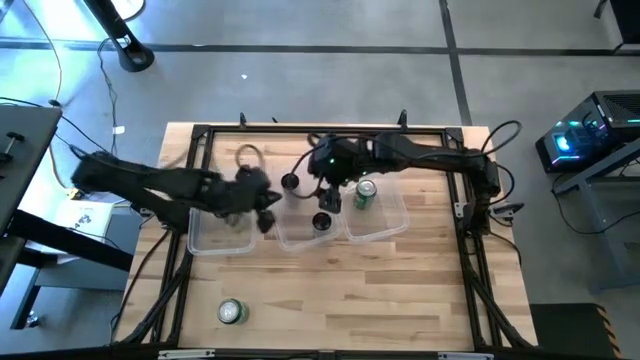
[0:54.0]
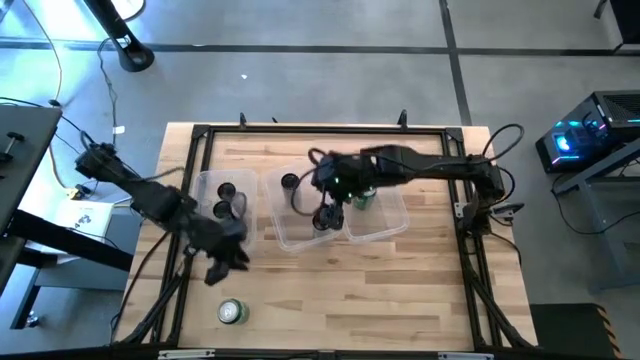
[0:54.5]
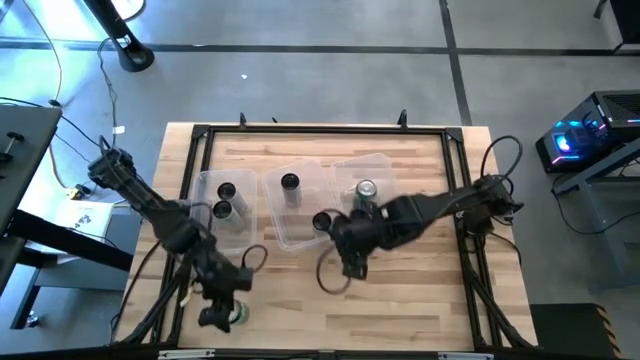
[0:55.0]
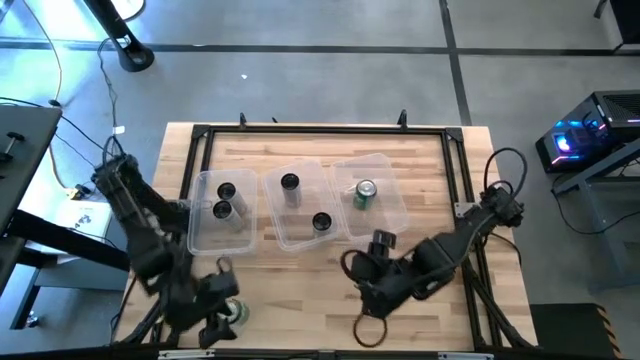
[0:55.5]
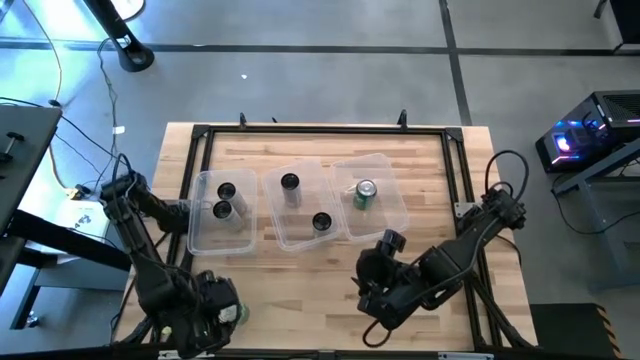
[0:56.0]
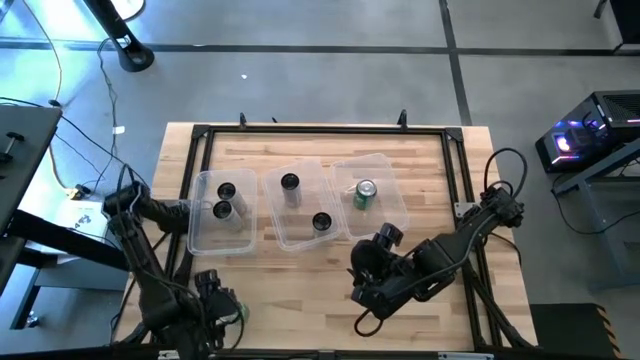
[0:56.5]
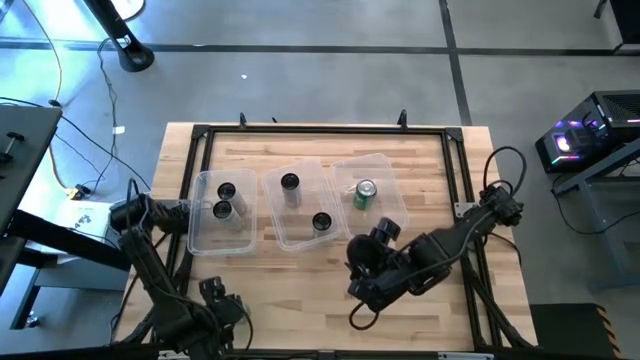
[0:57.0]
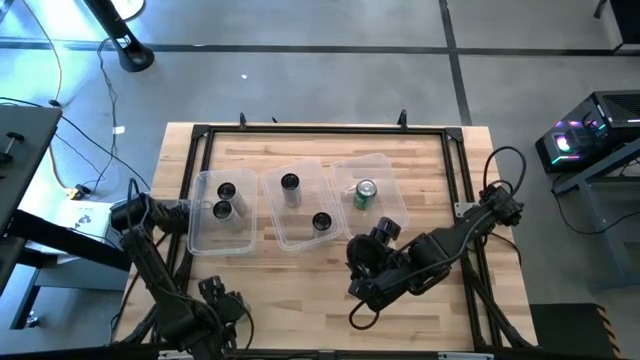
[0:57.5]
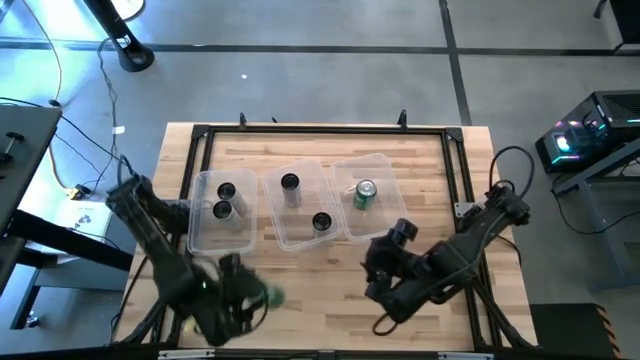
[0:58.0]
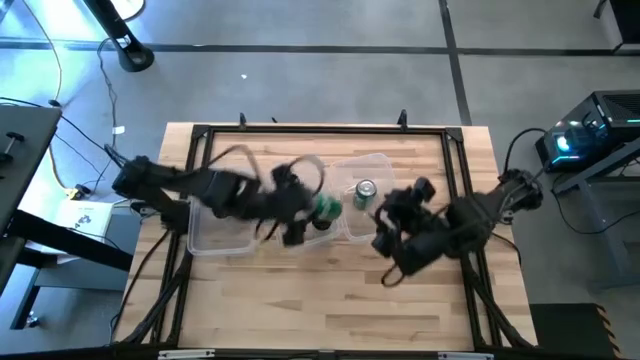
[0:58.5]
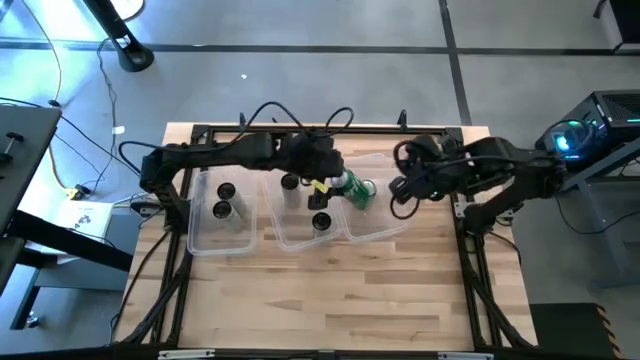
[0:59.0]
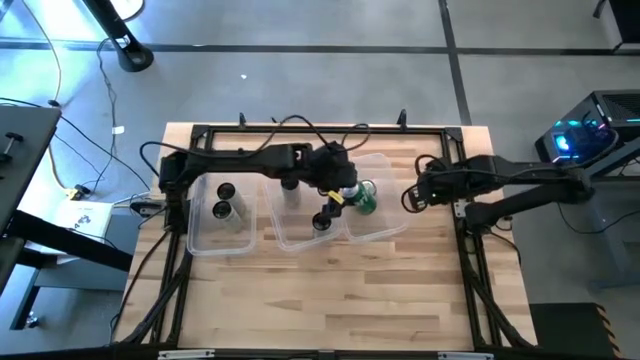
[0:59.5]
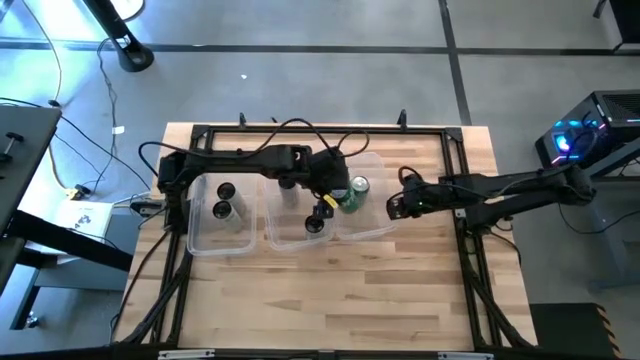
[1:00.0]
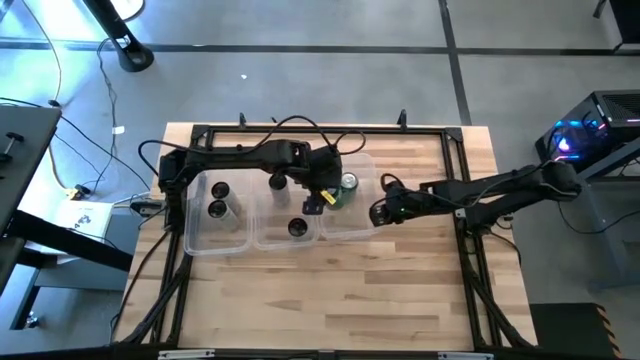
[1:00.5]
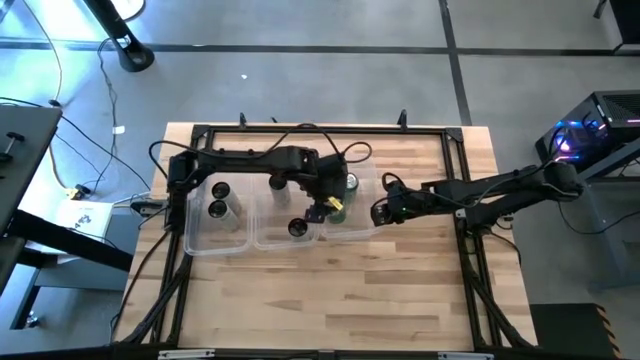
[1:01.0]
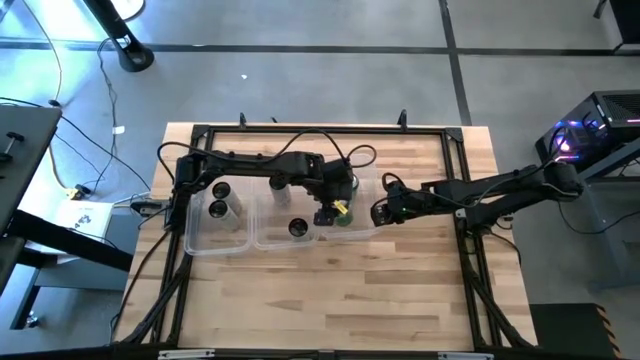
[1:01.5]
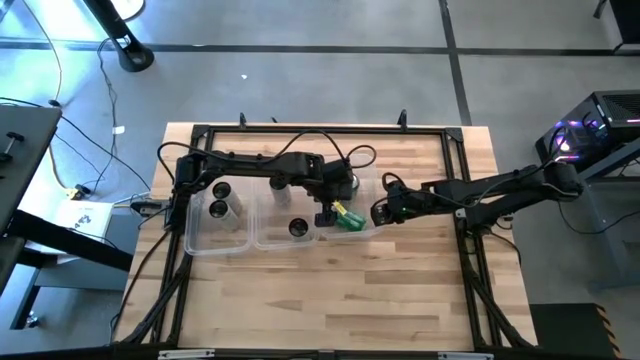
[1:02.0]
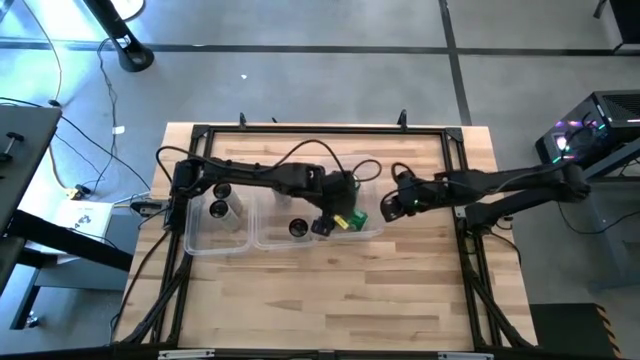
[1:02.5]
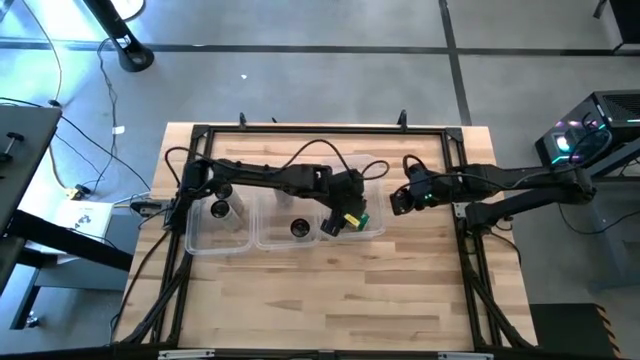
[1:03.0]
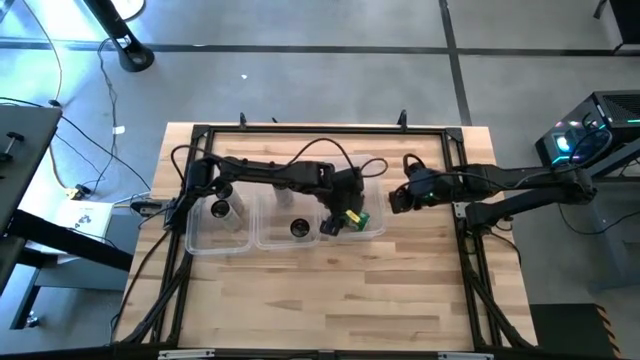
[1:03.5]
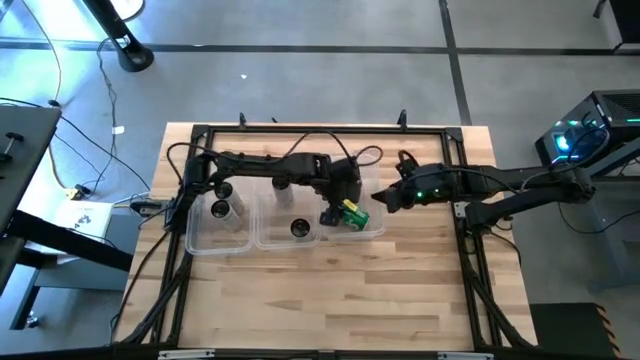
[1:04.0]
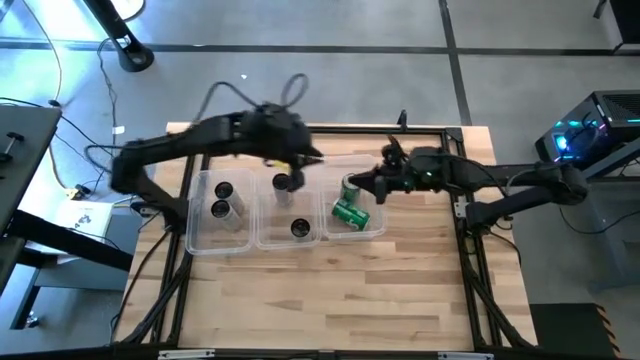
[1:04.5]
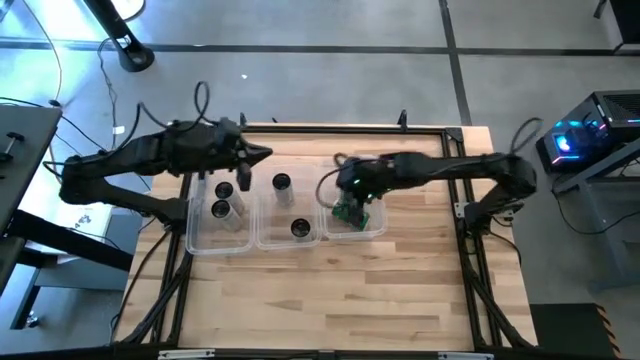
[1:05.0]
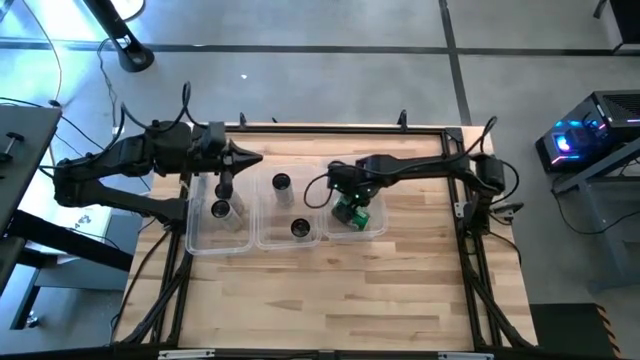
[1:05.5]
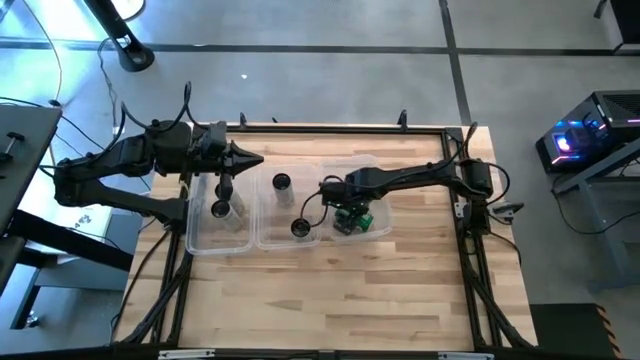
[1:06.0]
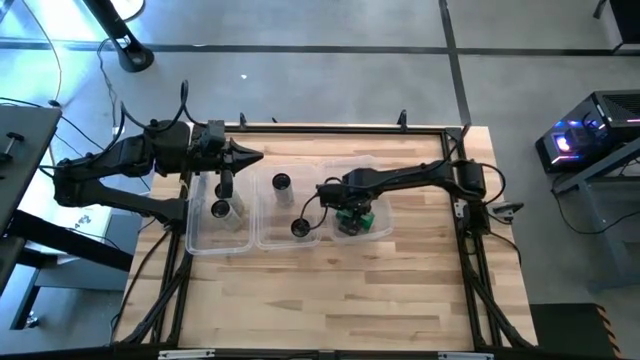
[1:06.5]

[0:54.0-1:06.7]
Task: Sort soda cans
Put the green soda can into the right transparent container

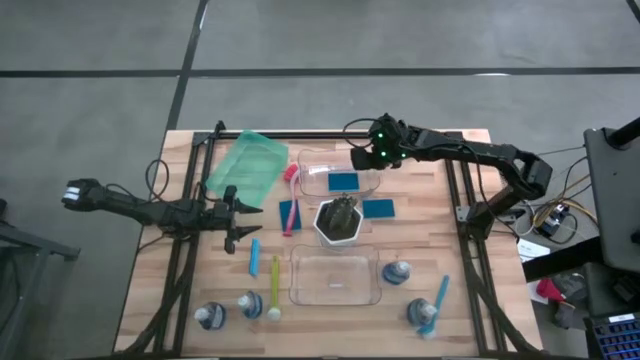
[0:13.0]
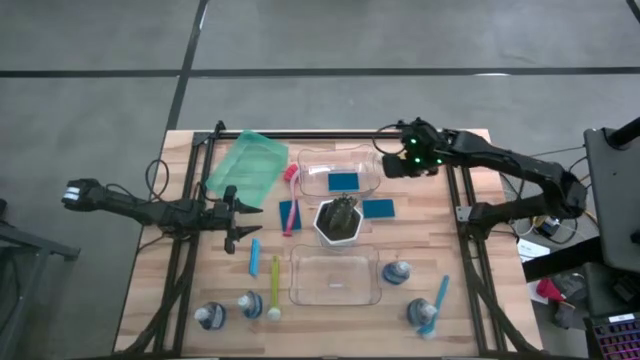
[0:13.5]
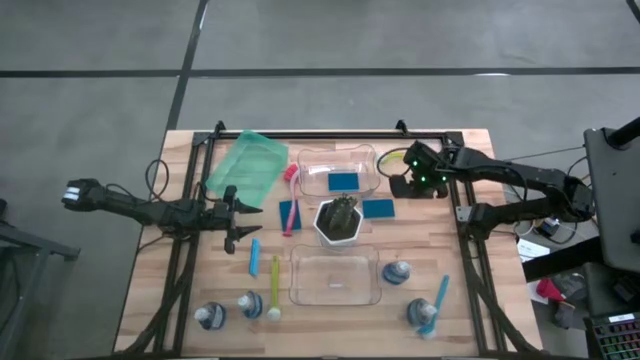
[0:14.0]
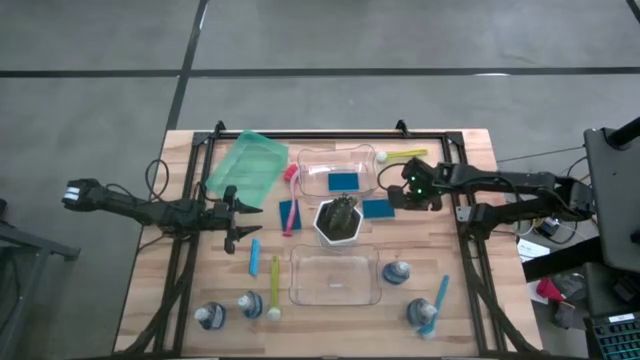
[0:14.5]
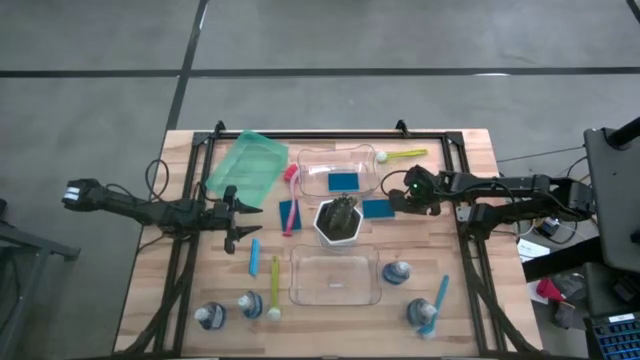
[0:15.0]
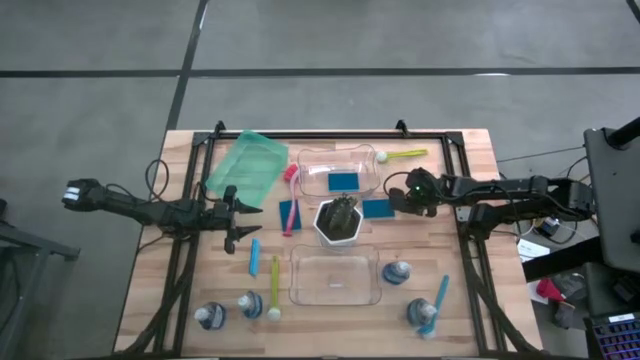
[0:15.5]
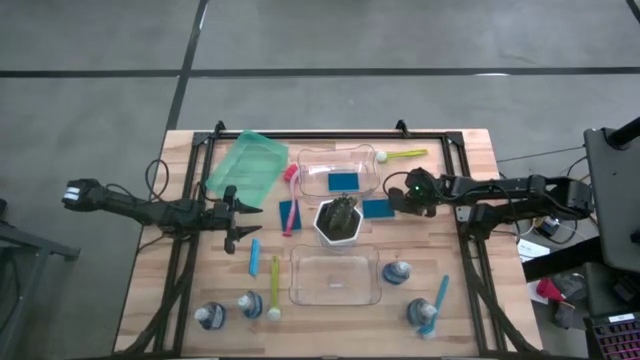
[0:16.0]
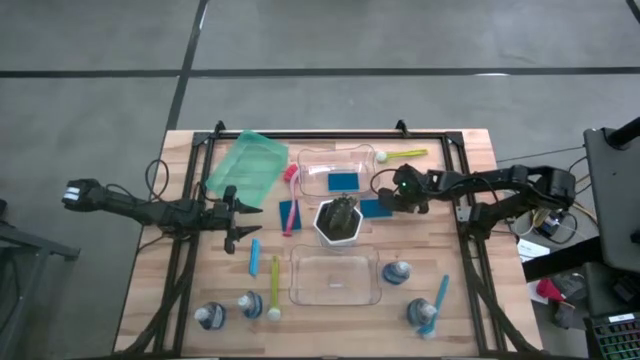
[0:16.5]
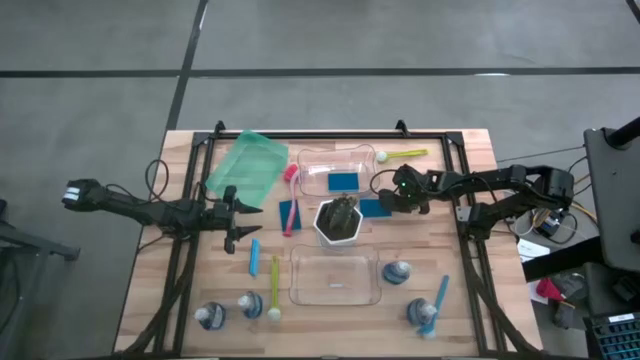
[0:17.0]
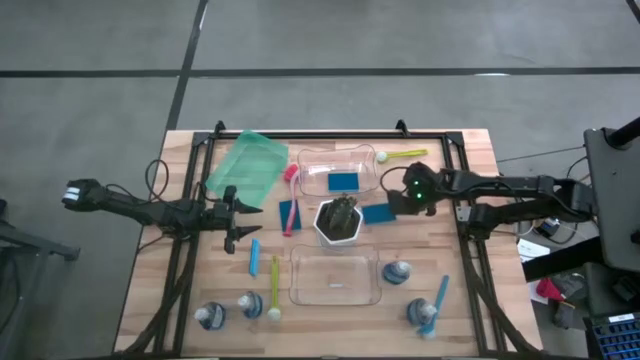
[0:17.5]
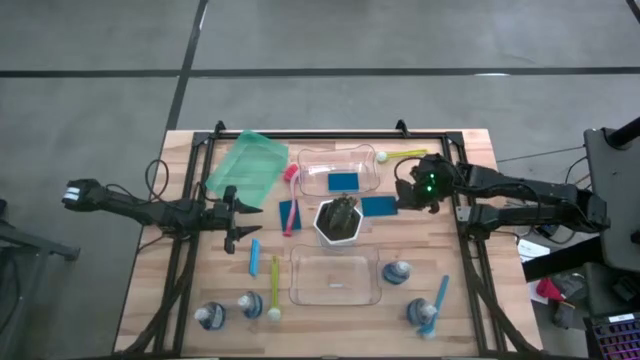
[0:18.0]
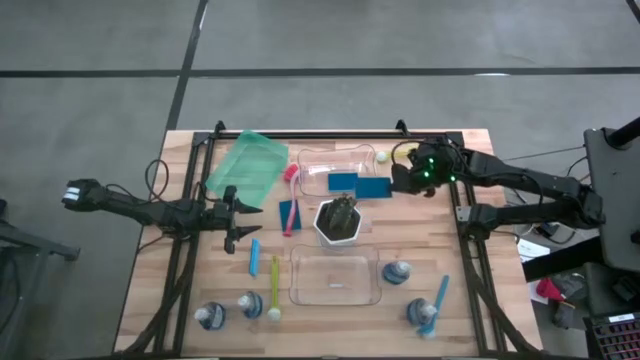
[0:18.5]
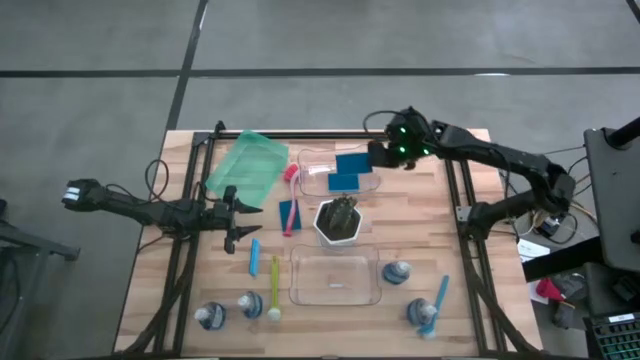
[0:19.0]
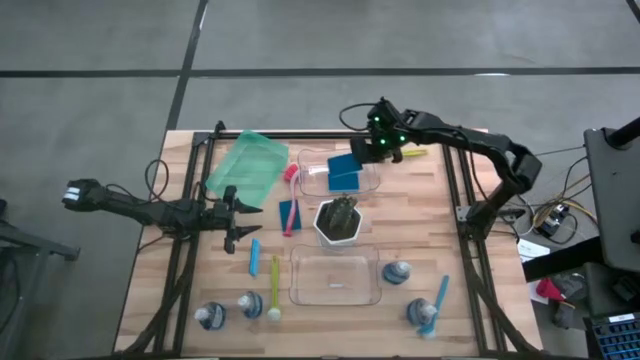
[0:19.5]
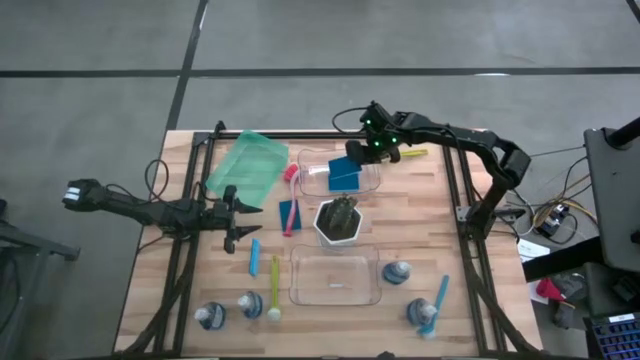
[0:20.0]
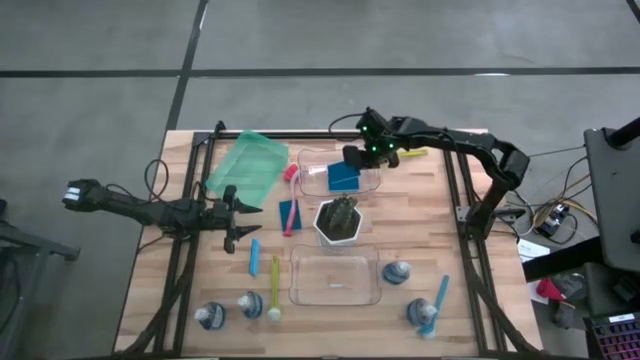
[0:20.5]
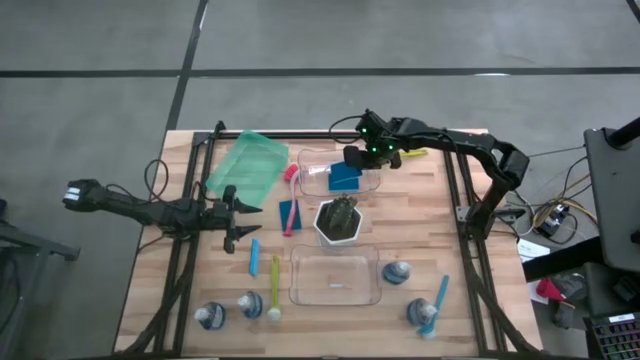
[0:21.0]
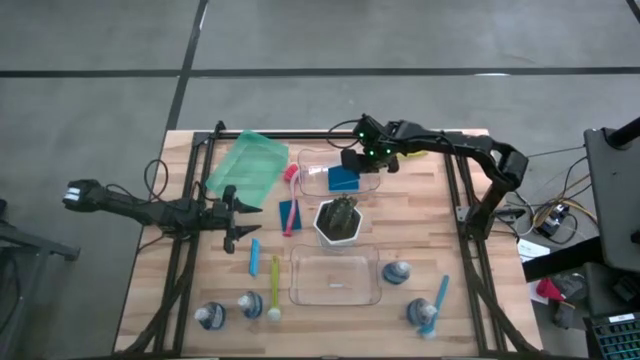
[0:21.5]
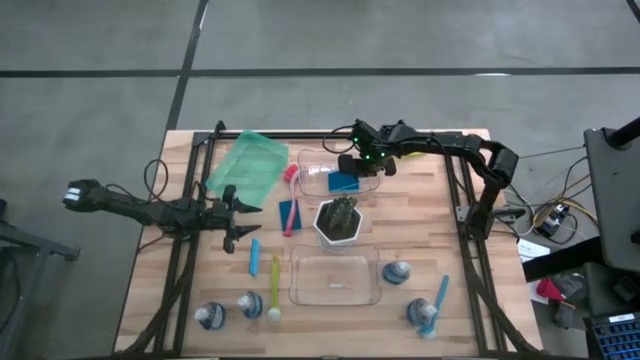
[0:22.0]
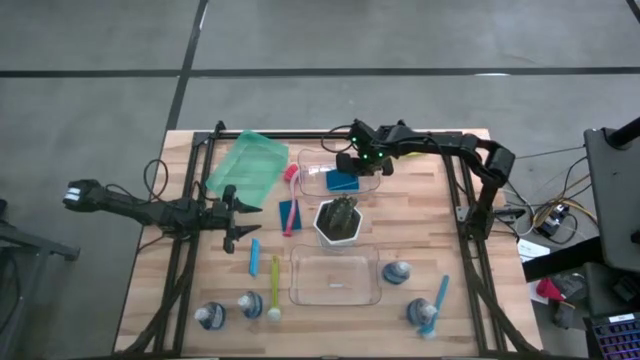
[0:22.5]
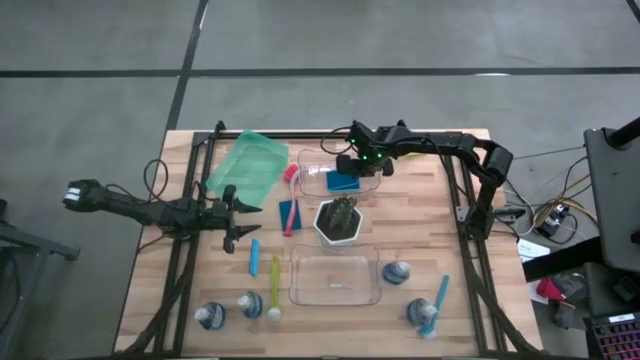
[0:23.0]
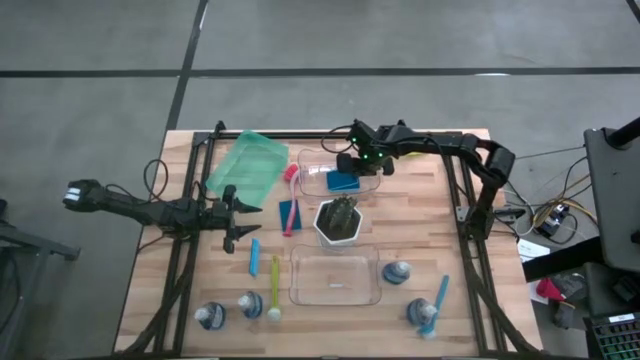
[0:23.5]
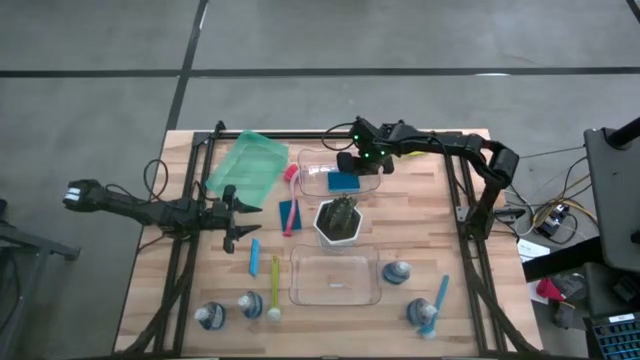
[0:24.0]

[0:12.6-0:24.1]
Task: Pick & Place Kitchen Sink Supplies
Put the blue sponge wipe into the top transparent bin
